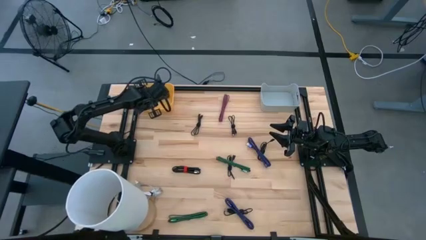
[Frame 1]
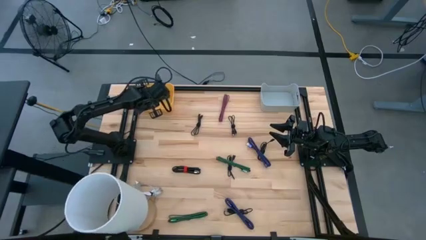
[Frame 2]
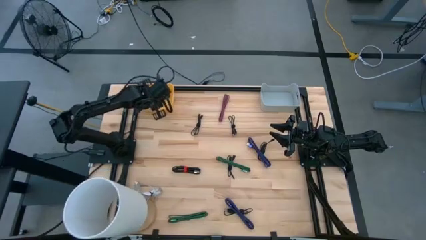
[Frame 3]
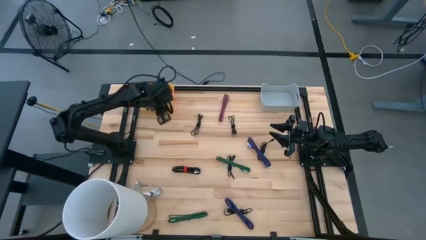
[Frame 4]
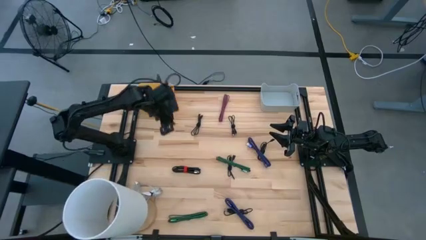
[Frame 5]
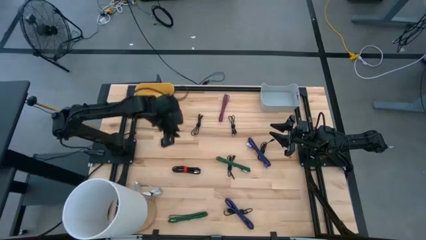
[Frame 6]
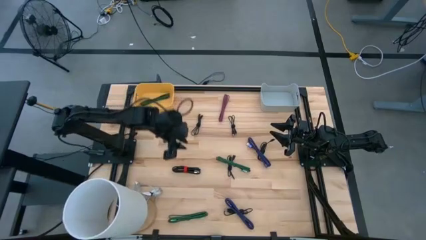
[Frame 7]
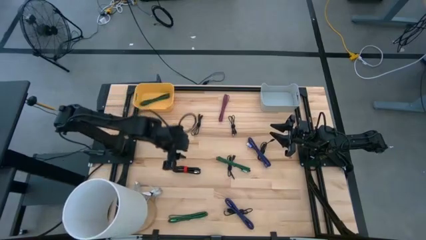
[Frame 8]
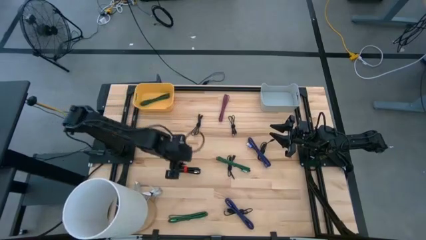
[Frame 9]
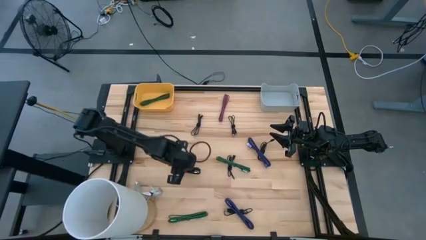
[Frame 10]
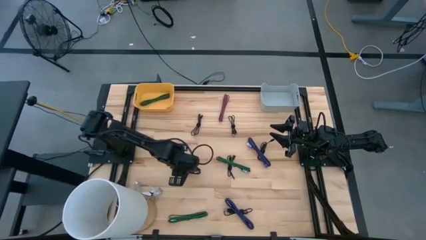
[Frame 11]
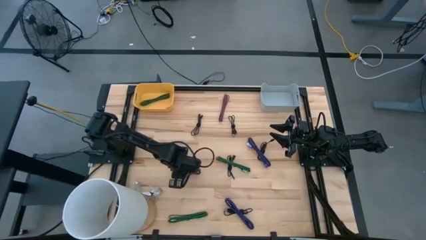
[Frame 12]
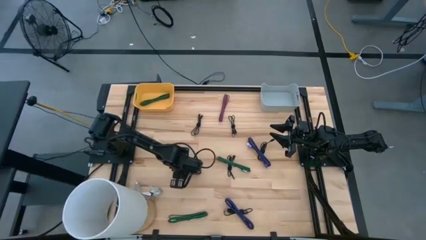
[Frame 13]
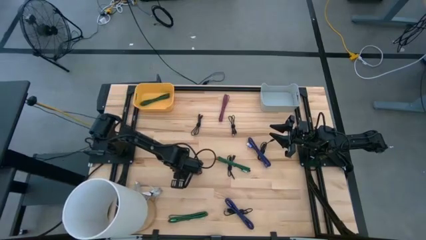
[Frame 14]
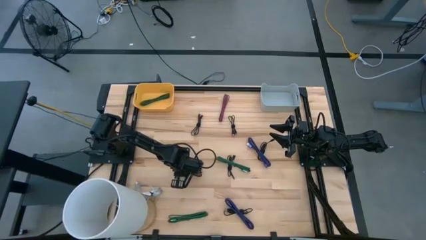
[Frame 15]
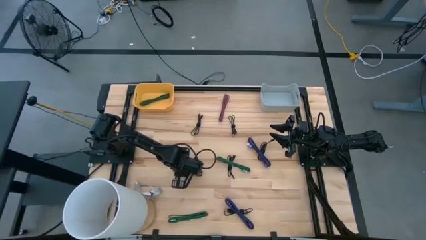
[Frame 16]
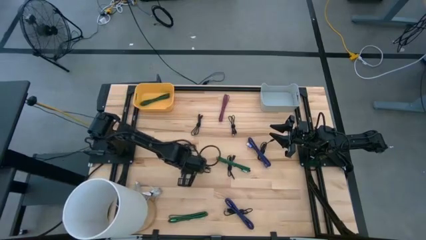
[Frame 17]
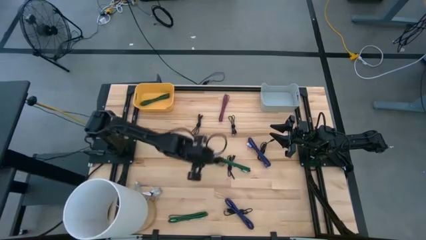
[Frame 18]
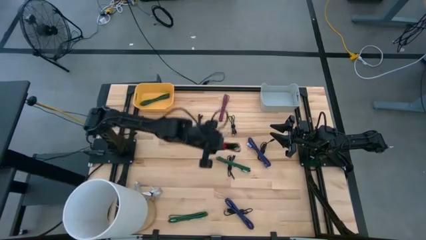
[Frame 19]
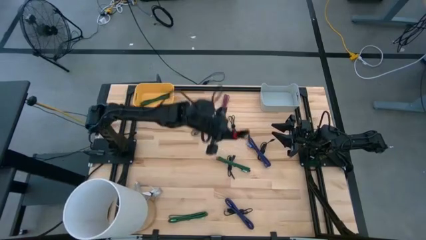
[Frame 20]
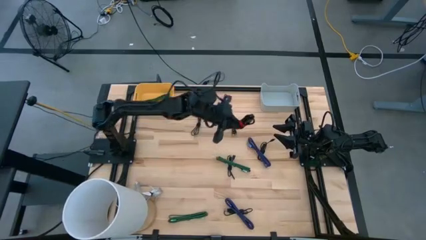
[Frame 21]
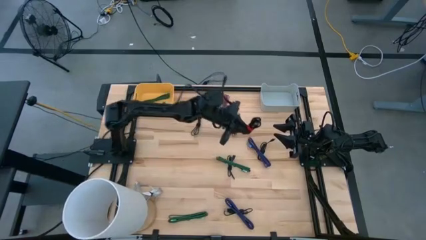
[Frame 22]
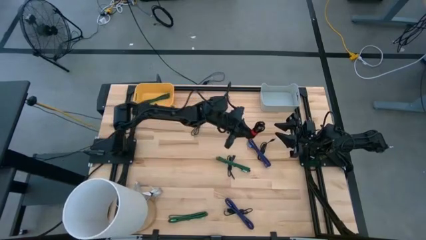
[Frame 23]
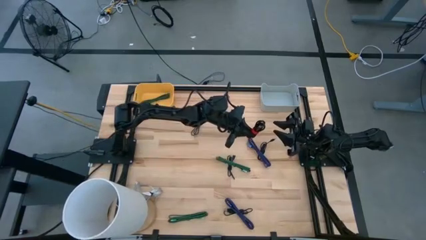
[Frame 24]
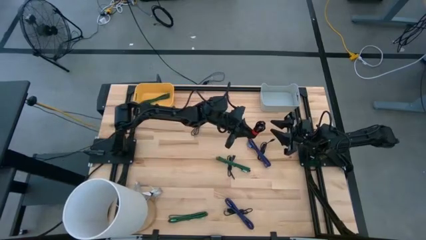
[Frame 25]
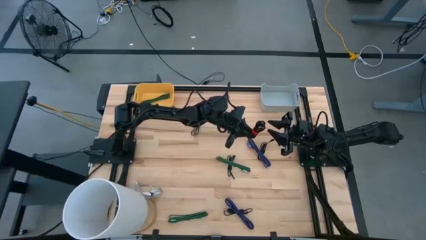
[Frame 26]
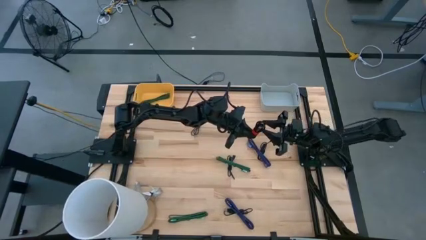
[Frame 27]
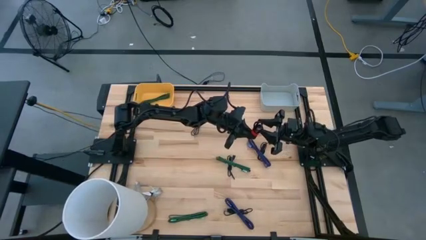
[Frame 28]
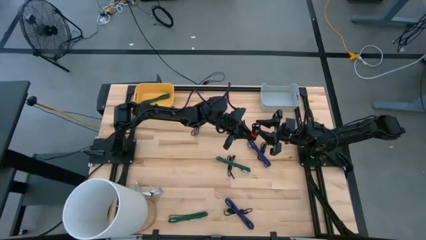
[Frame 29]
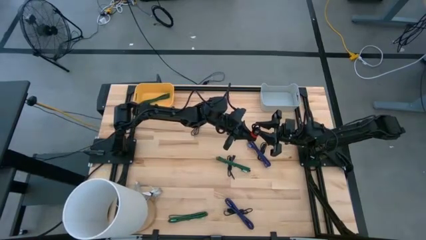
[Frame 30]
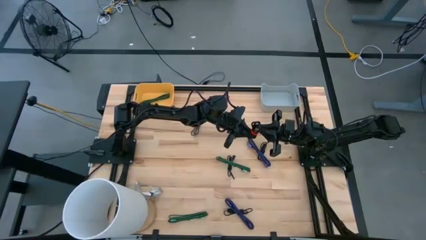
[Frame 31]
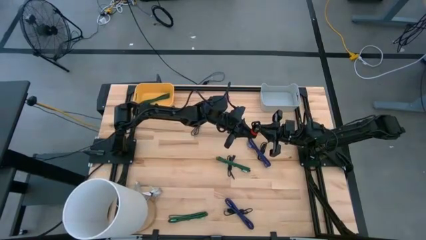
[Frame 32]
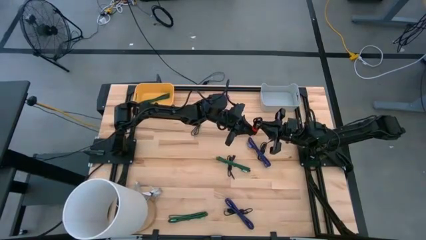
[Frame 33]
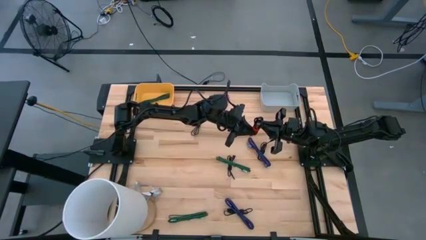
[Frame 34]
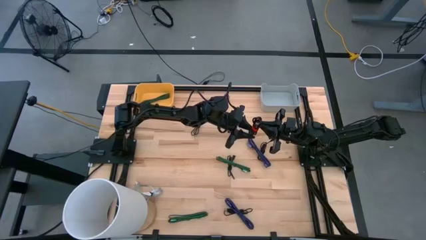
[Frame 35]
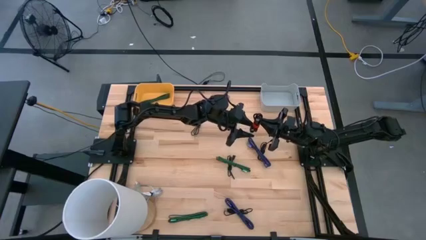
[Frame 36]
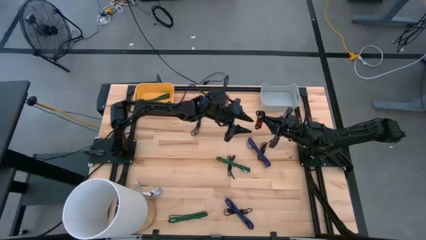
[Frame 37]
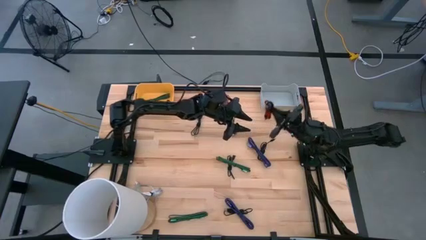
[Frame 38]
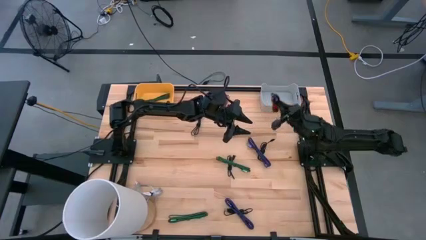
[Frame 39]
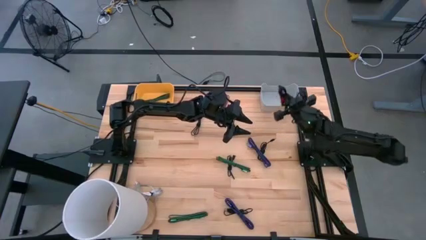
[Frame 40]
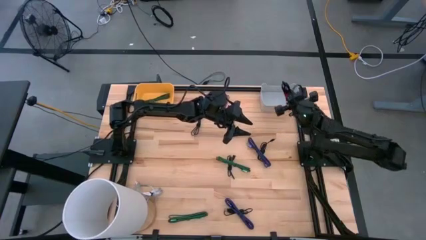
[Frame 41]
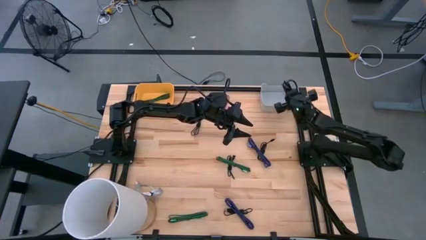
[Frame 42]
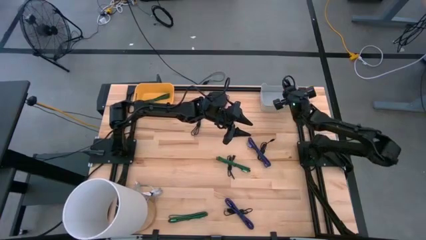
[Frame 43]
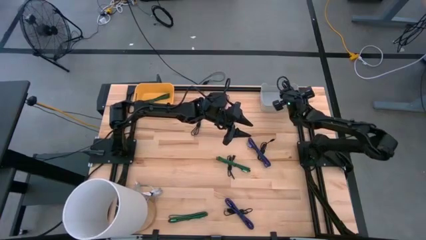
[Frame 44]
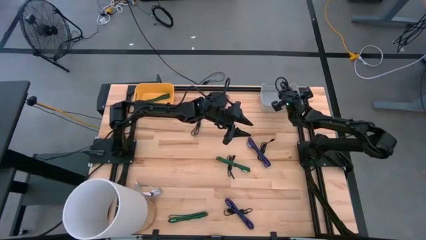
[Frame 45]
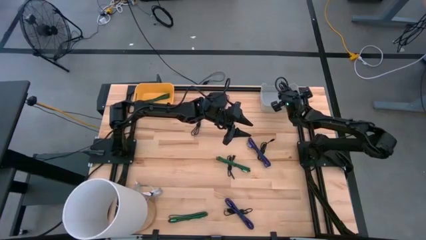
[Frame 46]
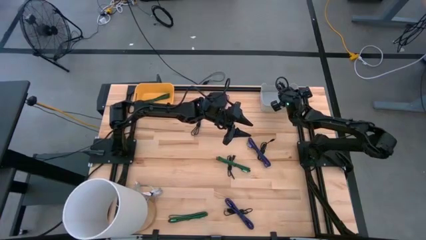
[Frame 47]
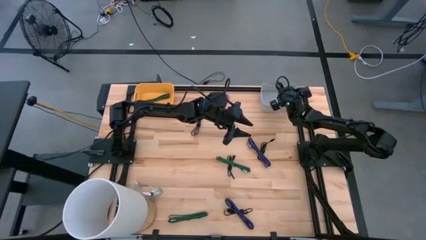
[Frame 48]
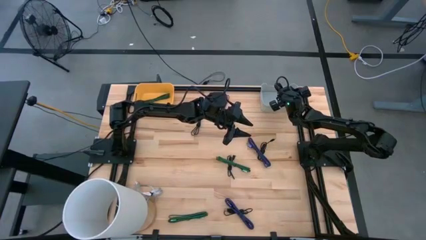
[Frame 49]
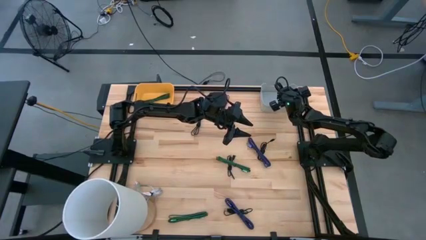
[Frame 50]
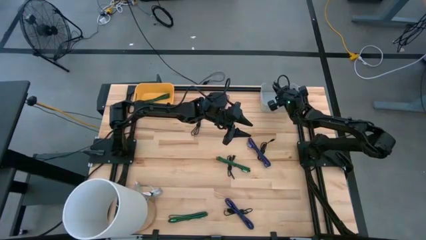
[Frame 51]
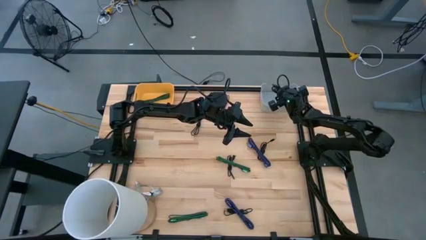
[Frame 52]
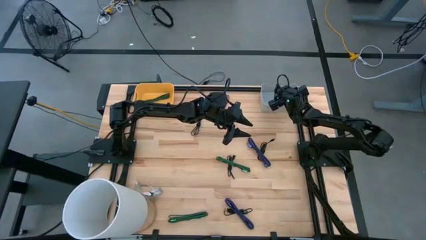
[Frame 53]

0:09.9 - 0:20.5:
Task: Pick & Place USB Port
Put the black charger cable into the gray bin

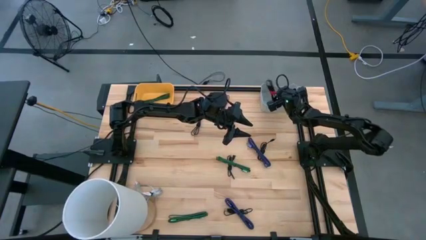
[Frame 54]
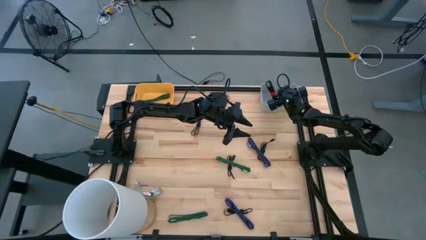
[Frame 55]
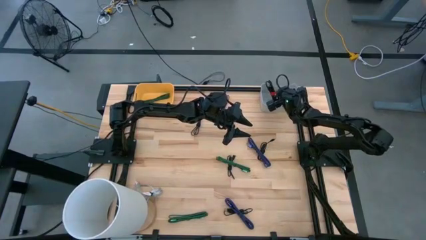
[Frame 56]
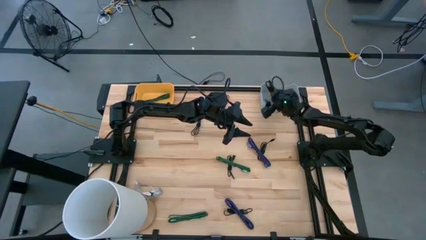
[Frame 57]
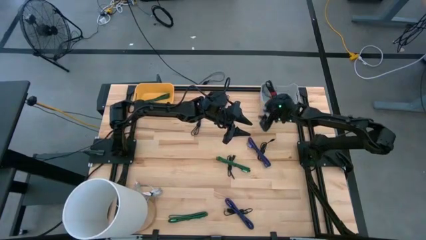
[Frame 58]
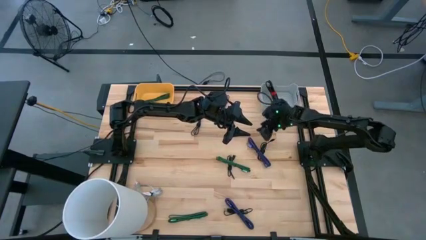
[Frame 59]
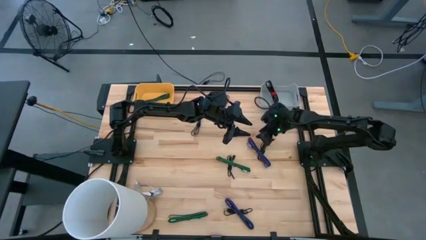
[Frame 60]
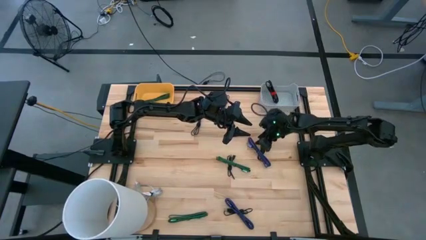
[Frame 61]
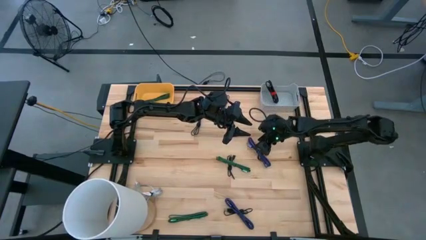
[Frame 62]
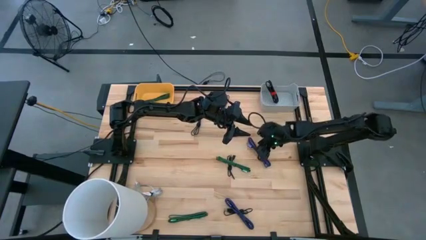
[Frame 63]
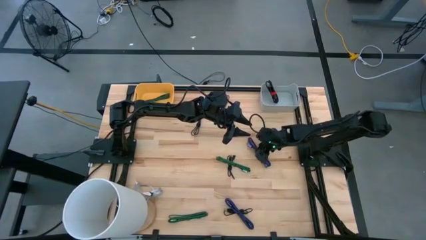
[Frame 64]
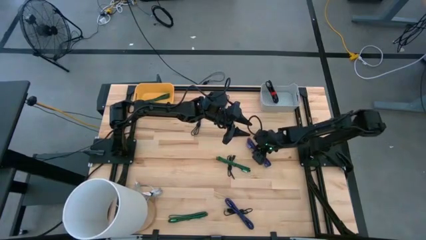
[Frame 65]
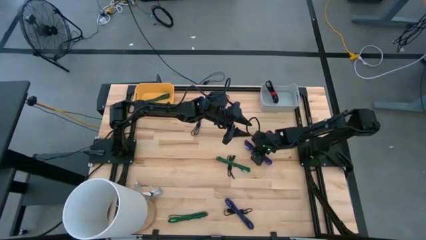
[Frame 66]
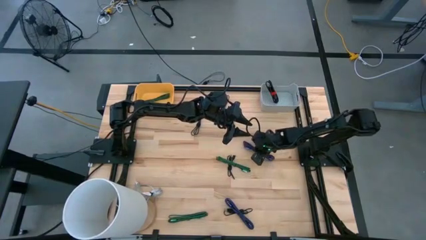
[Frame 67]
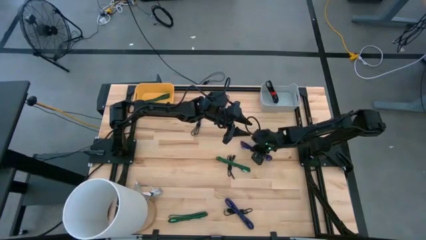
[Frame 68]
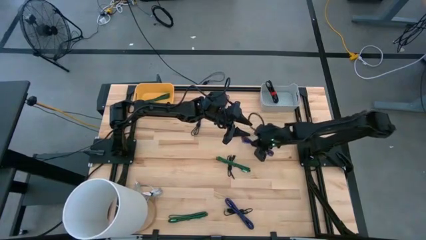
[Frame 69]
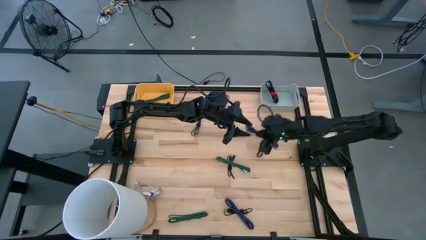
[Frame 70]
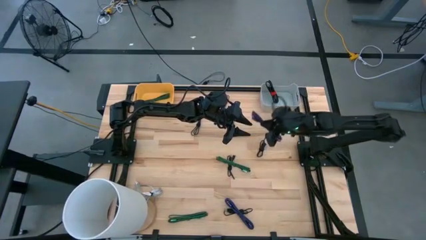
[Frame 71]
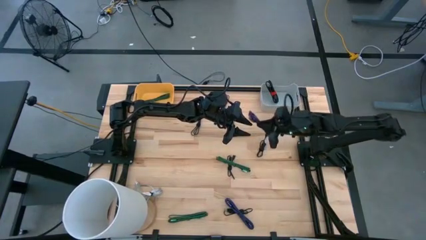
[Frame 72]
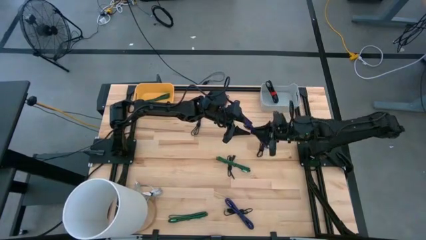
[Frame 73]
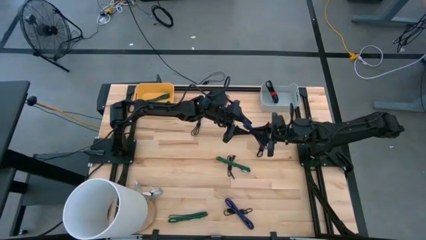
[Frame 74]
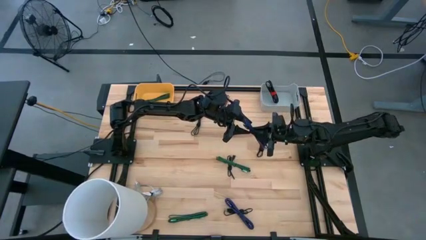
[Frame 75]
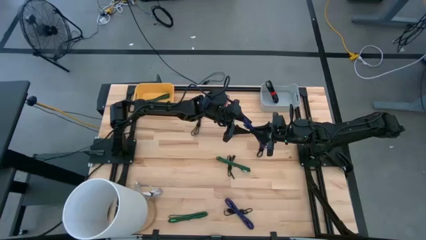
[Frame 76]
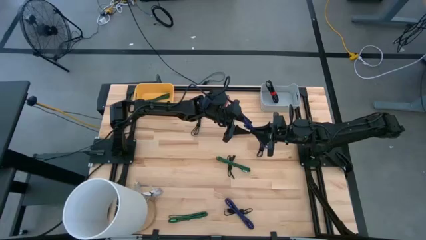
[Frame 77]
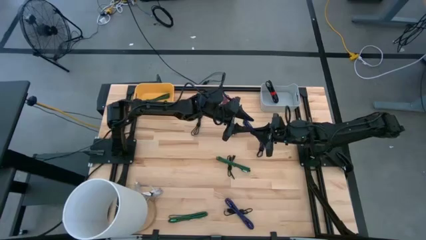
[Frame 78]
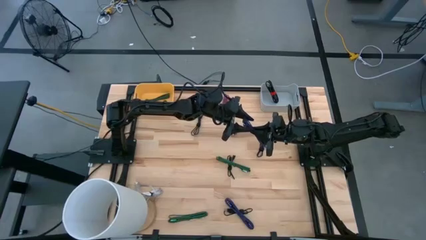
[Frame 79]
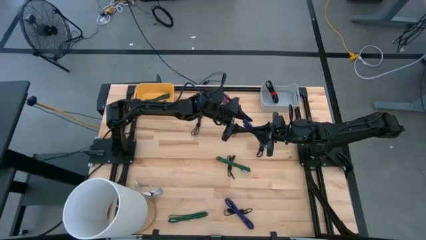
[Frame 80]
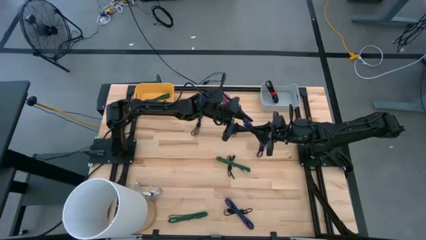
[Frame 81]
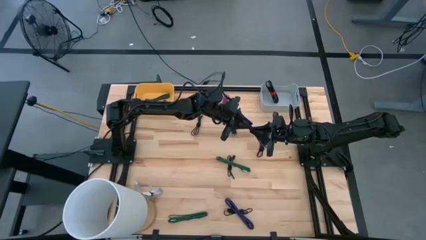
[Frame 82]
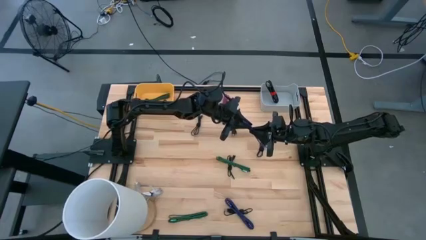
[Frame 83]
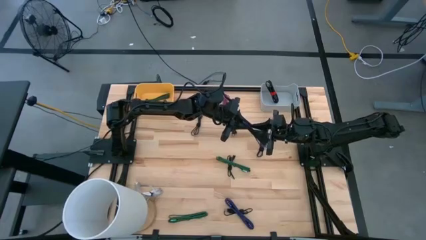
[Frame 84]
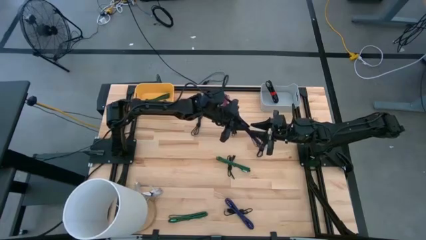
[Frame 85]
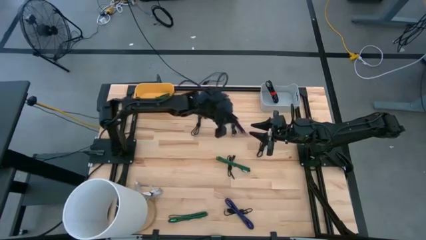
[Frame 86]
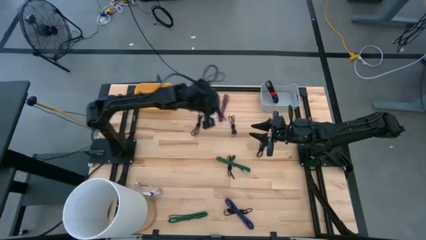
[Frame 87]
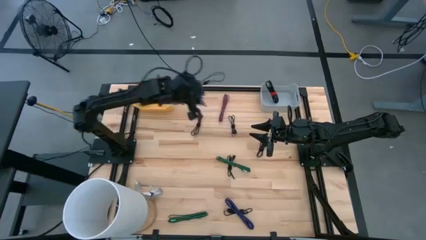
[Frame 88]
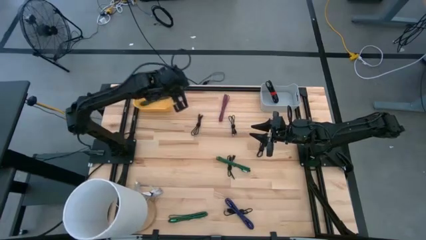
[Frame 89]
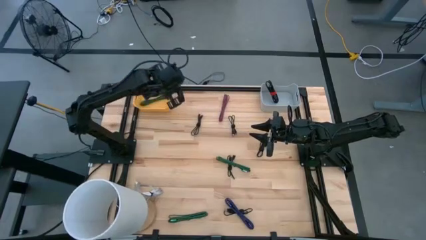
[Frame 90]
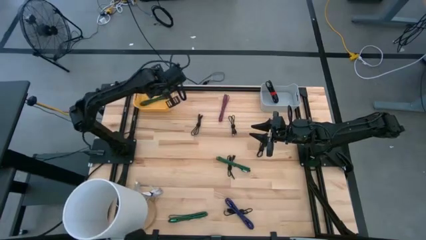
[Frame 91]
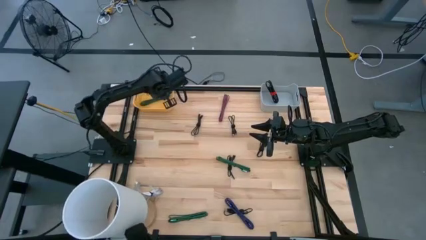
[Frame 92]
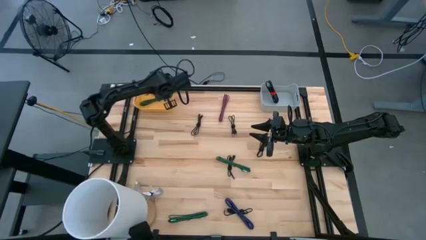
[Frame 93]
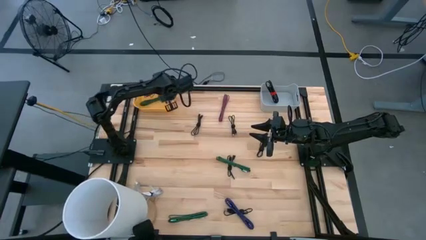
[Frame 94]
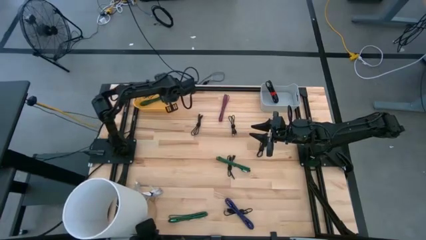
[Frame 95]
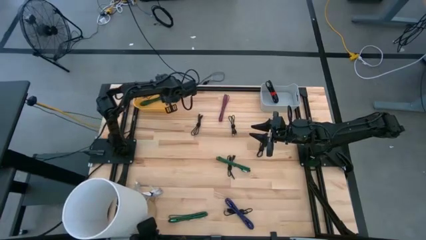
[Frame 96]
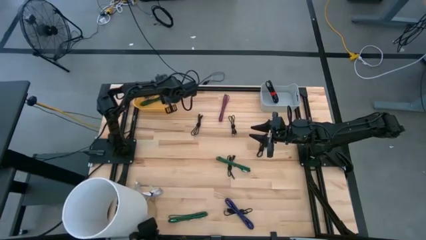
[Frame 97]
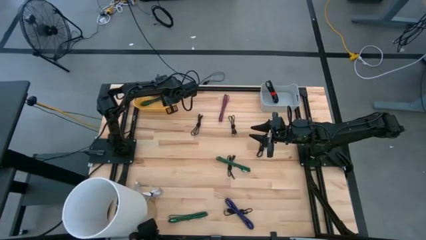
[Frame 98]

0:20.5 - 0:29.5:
Put the purple charger cable into the yellow bin
